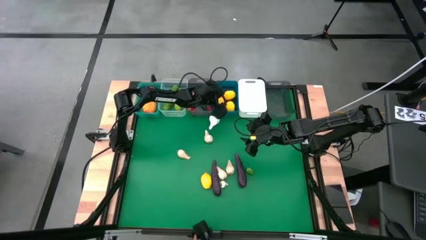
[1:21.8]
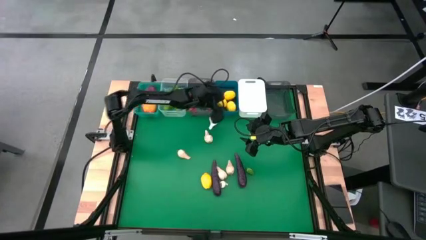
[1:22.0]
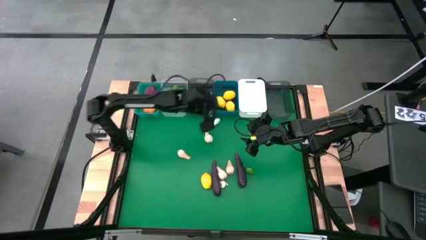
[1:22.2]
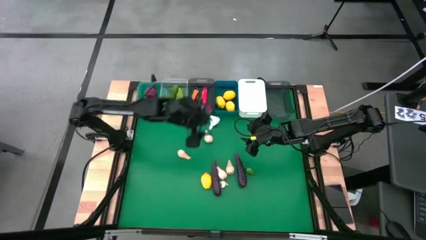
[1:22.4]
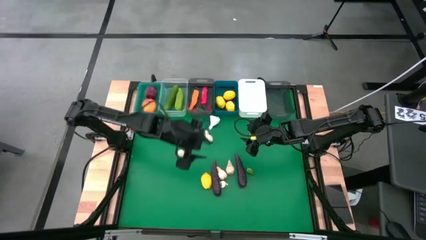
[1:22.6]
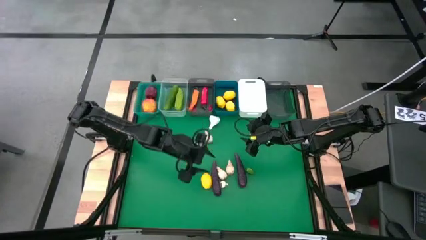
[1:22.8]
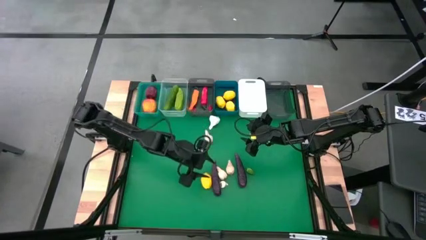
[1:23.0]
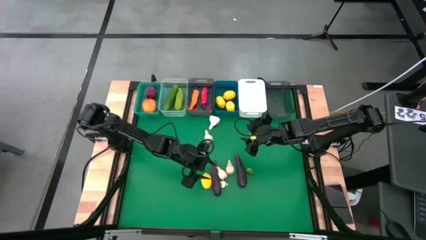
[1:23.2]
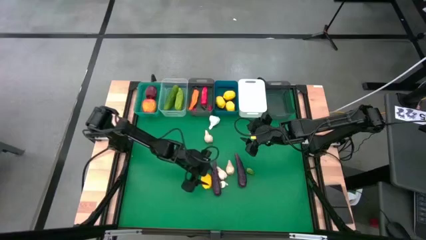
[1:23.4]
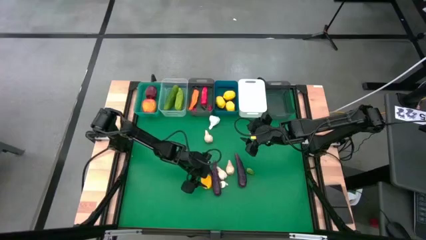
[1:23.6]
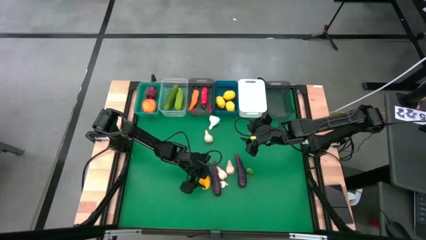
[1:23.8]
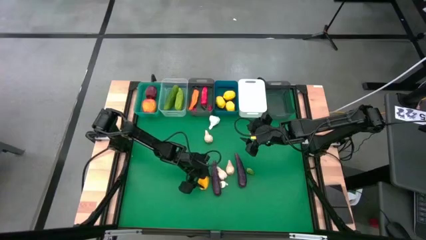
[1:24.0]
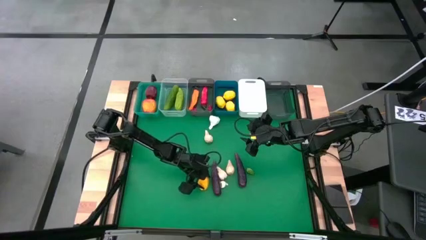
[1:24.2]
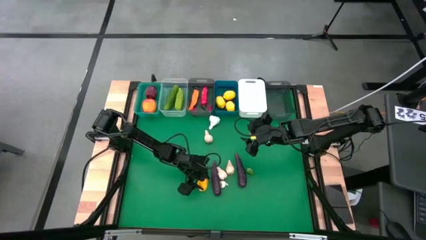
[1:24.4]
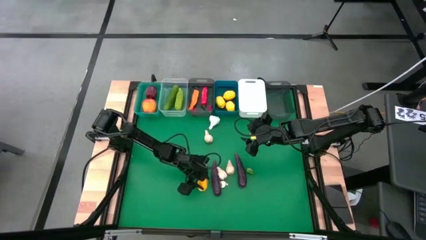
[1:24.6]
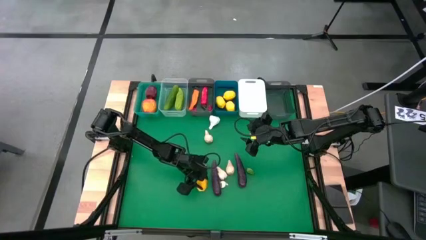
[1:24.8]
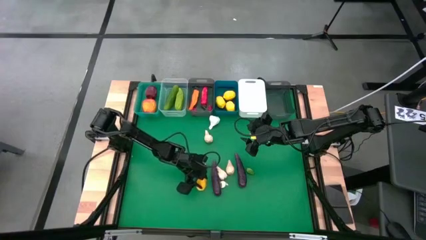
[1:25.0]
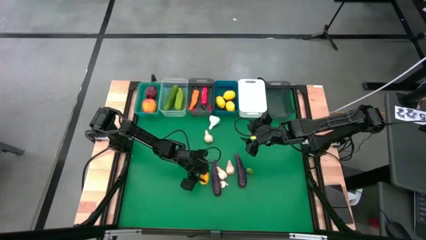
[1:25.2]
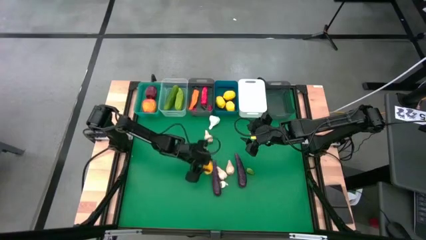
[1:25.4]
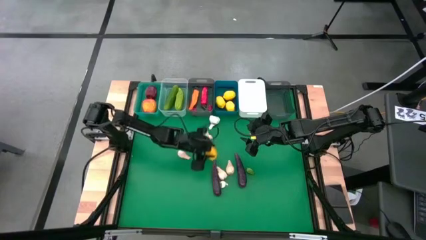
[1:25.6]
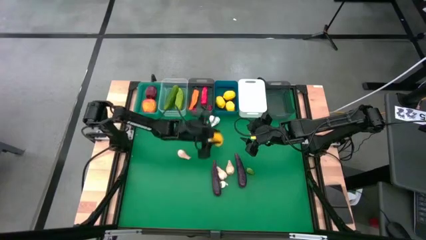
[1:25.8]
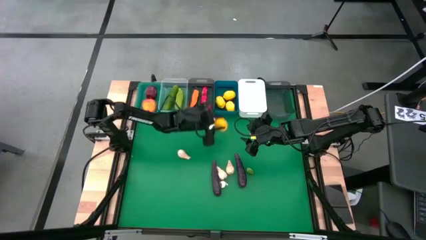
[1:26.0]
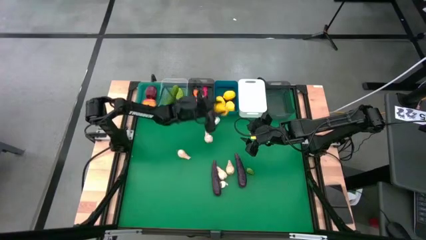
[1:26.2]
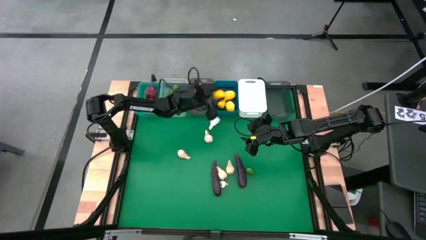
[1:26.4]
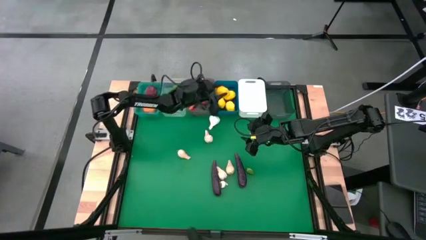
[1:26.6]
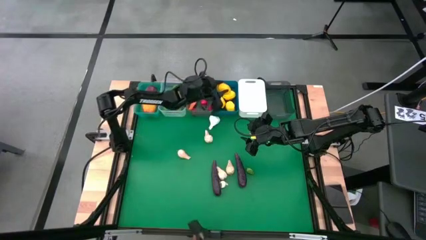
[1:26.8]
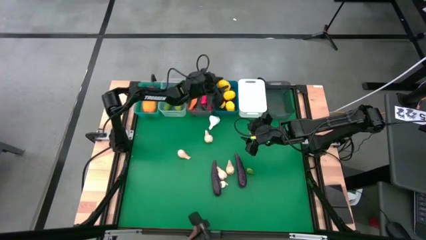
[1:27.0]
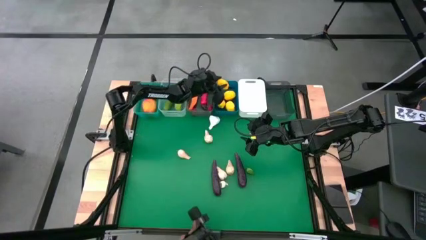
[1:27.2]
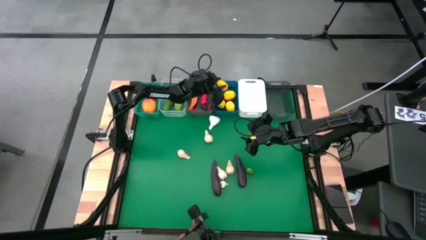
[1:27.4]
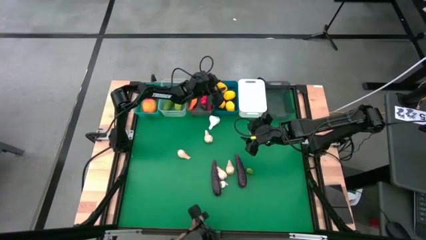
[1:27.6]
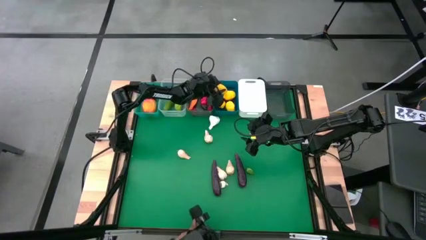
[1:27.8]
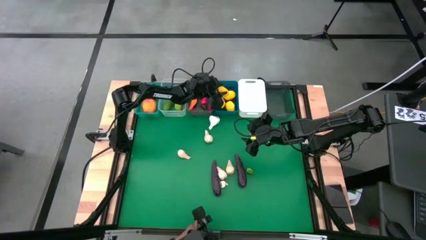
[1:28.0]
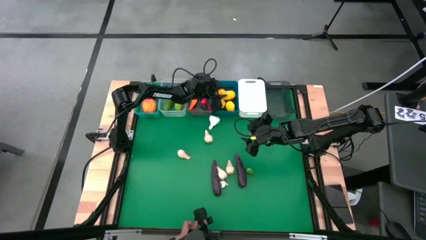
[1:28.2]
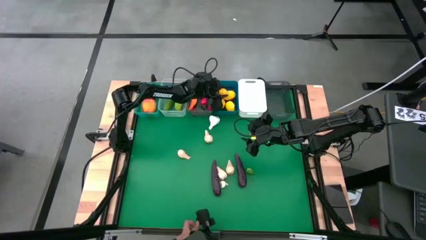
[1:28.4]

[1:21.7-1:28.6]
Task: Sort produce into baskets
Put the lemon into the blue bin

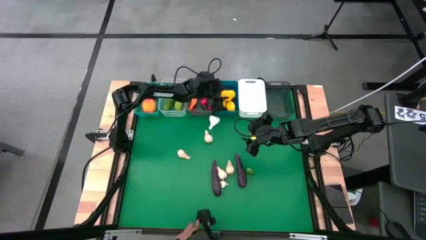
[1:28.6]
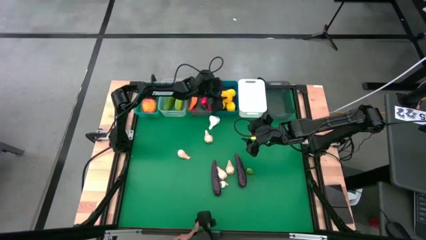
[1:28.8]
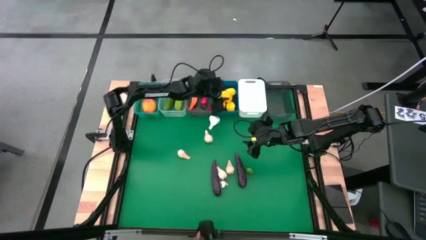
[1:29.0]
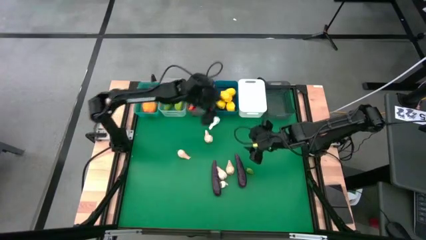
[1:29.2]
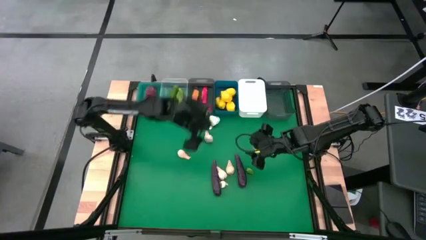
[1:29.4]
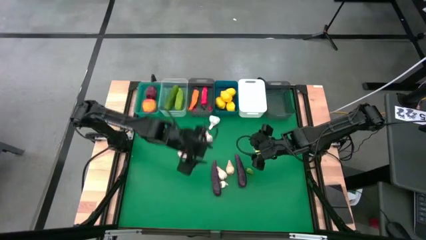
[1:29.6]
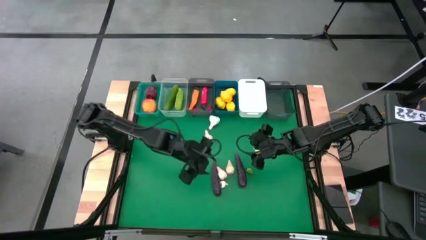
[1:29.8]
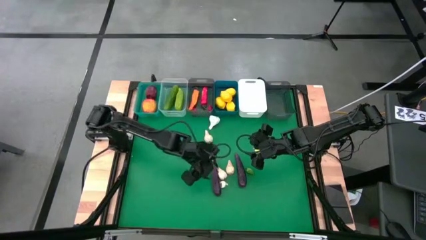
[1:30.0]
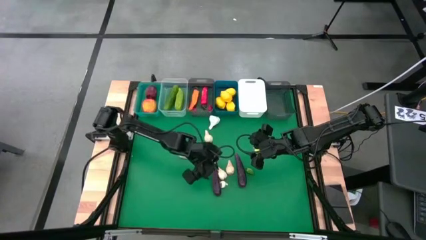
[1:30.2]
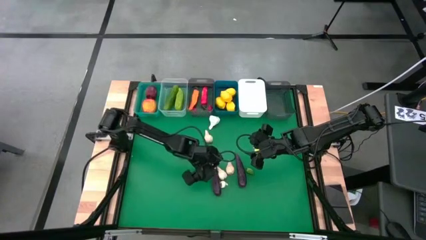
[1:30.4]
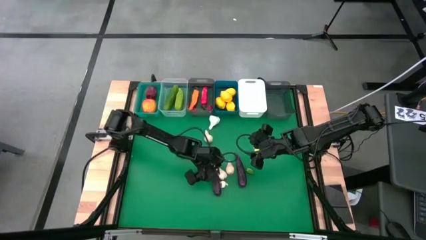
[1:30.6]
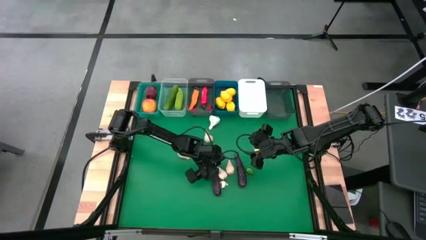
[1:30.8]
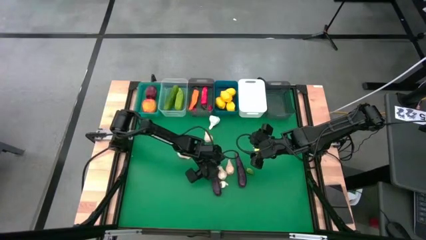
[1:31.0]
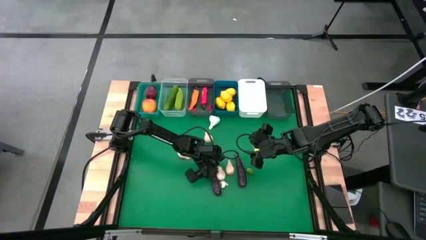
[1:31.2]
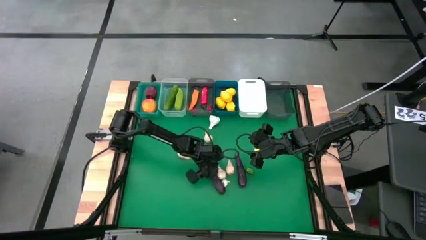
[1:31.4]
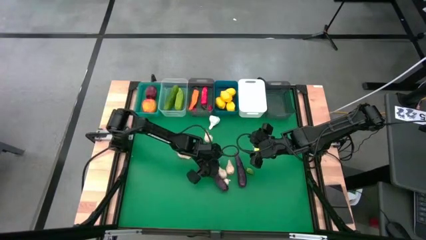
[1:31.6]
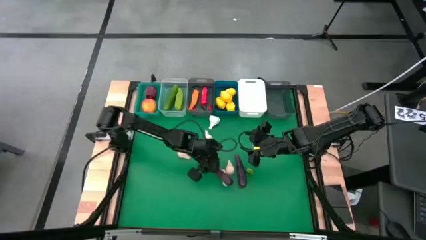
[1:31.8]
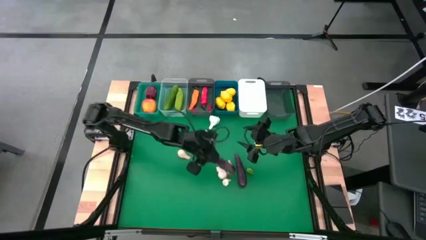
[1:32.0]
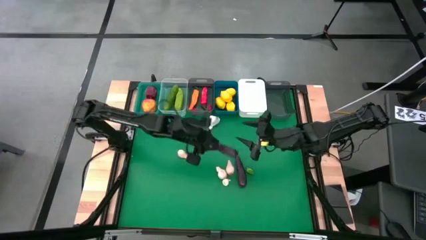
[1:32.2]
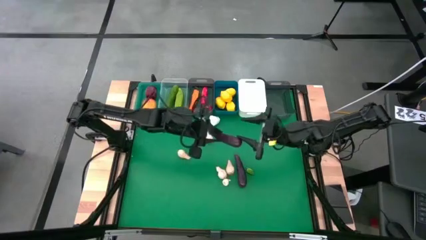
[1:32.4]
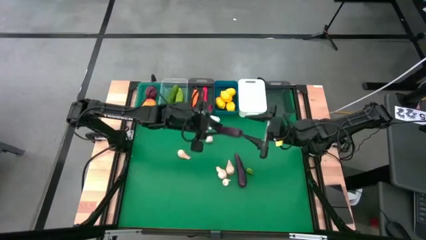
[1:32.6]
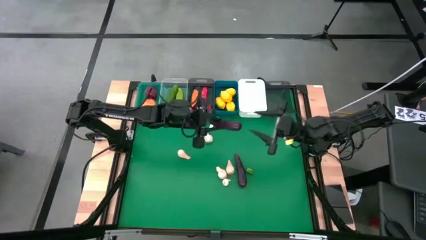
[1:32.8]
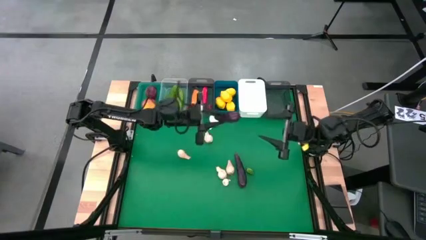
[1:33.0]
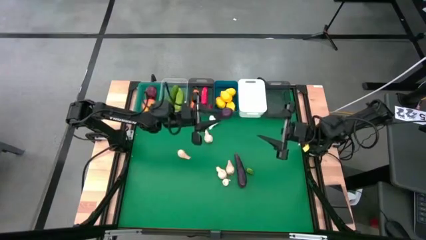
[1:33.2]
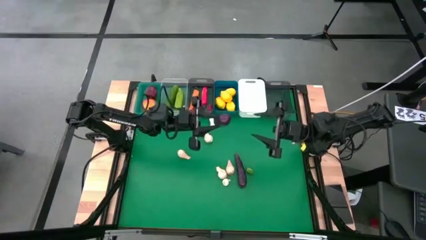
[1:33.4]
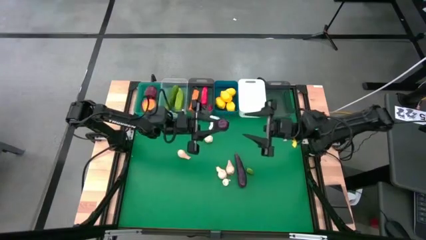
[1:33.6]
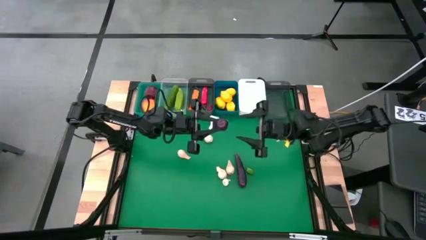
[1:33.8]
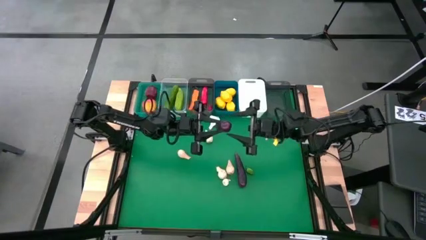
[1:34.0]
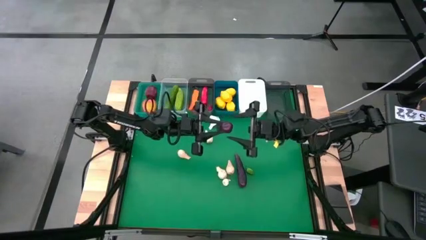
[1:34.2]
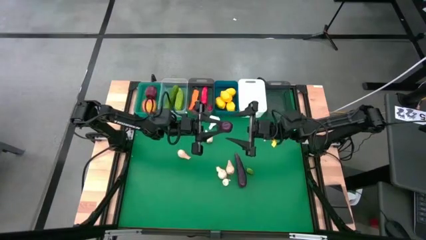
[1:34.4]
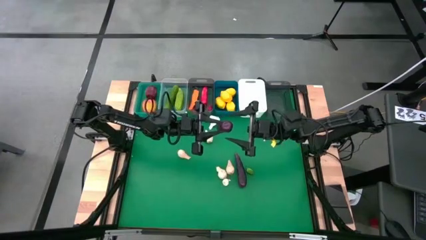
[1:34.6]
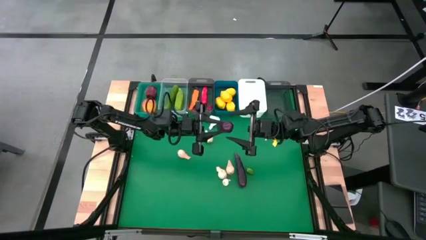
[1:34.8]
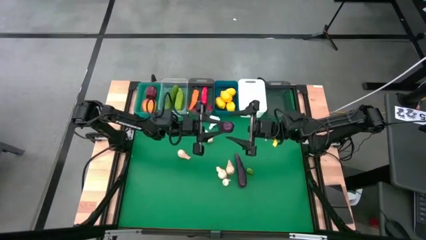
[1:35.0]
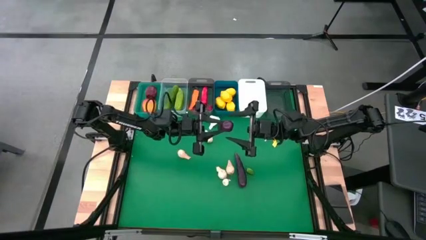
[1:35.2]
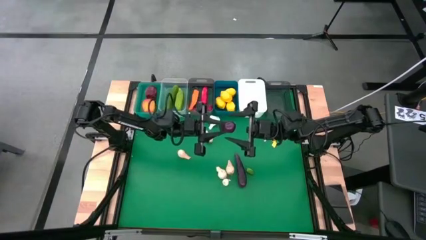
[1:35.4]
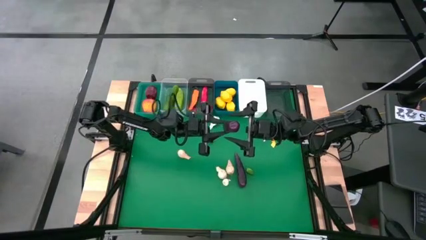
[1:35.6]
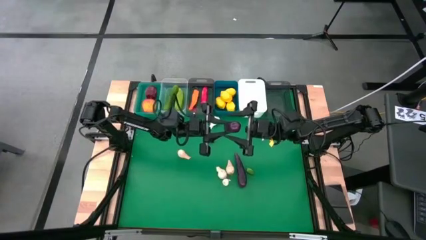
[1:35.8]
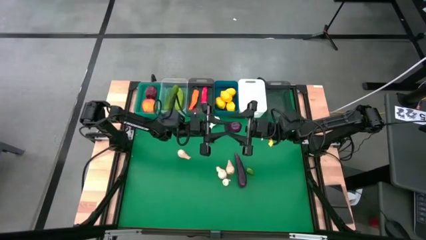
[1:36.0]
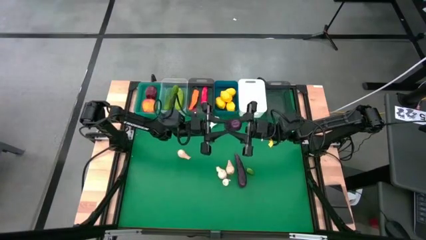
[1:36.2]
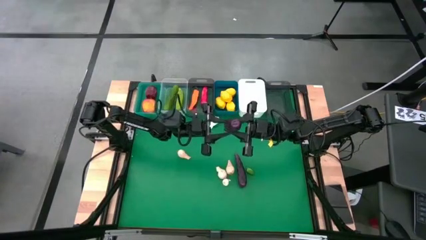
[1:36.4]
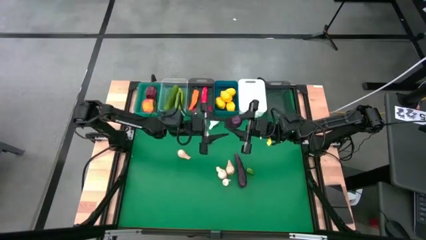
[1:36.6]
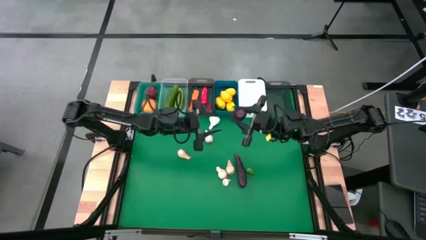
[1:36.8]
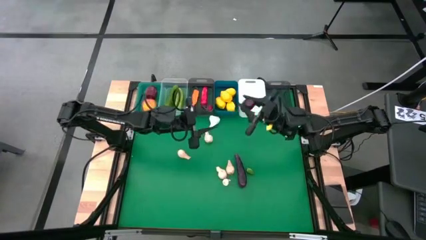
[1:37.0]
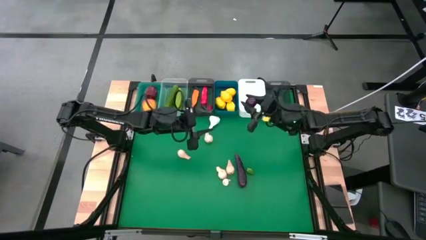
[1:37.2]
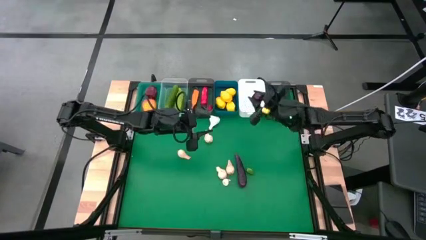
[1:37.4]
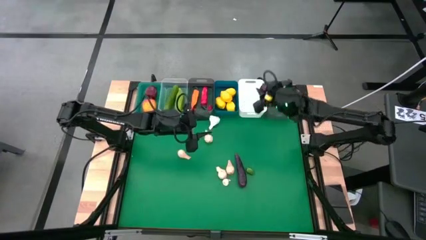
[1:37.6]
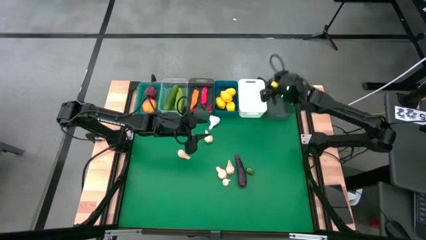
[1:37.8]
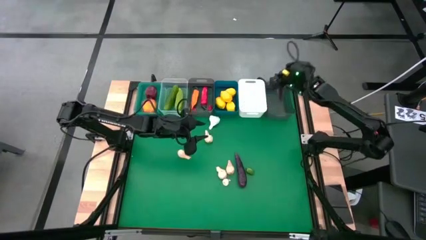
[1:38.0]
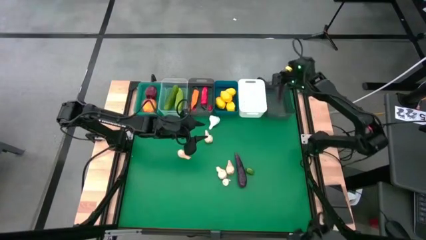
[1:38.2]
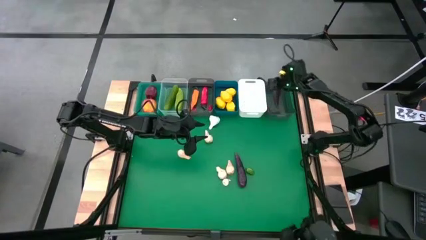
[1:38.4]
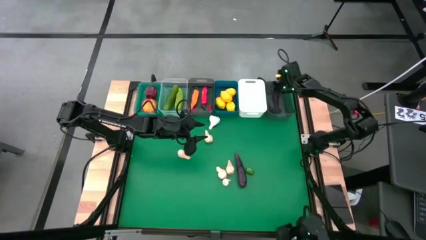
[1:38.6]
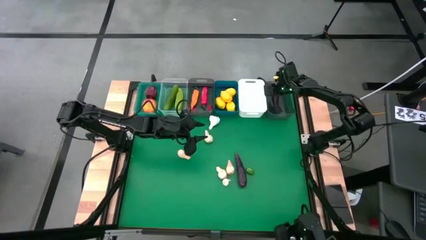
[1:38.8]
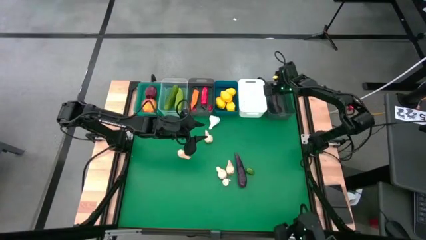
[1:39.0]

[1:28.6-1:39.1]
Put the eggplant into the right black bin
